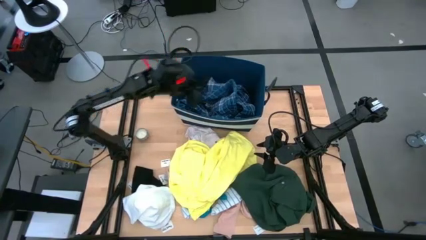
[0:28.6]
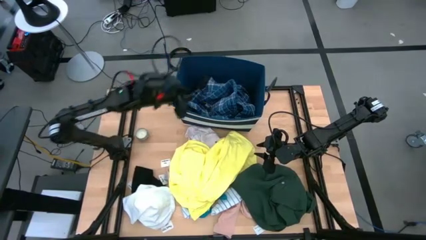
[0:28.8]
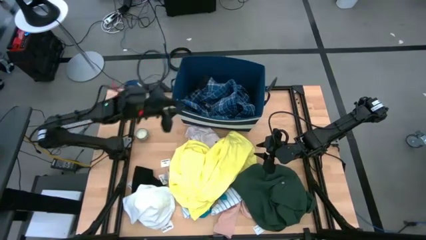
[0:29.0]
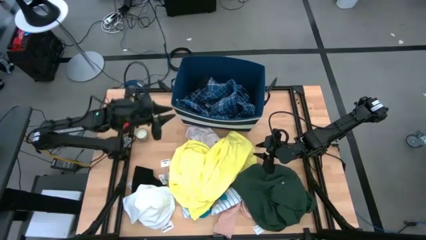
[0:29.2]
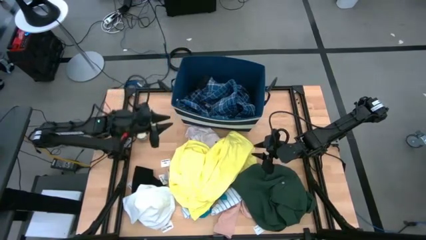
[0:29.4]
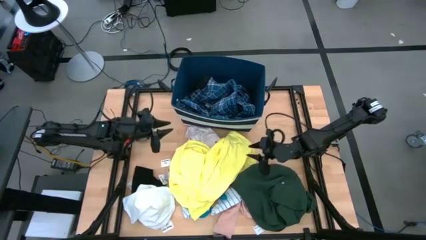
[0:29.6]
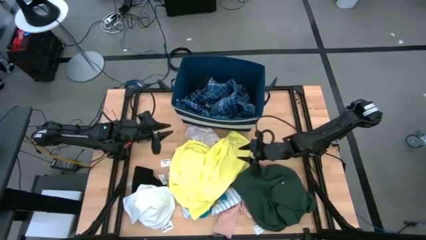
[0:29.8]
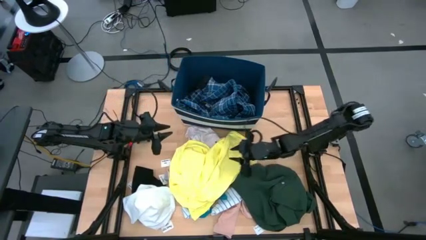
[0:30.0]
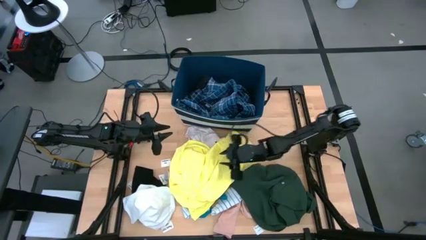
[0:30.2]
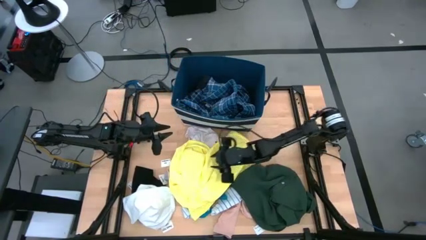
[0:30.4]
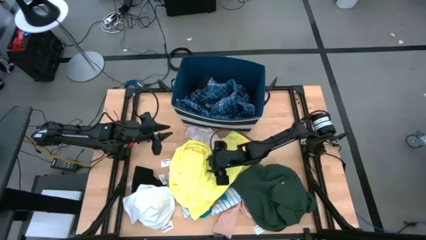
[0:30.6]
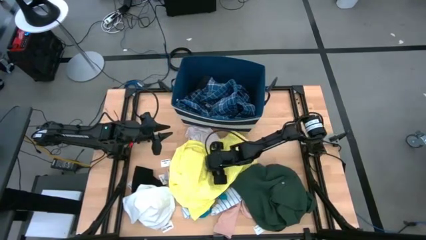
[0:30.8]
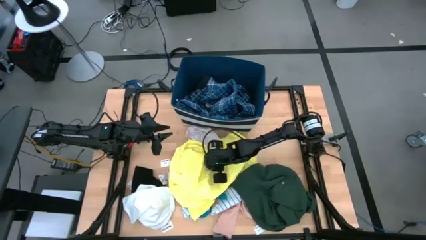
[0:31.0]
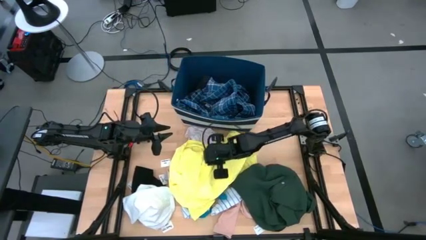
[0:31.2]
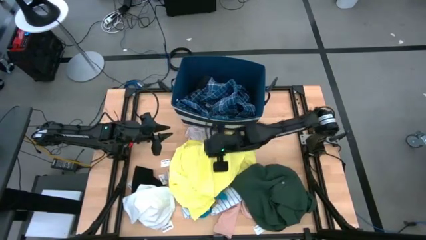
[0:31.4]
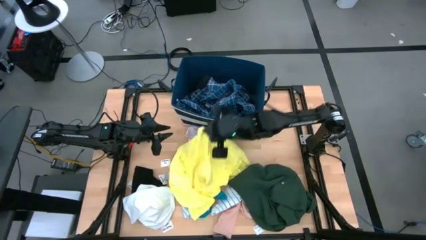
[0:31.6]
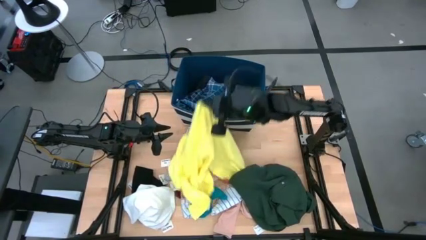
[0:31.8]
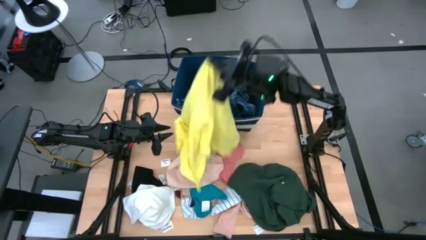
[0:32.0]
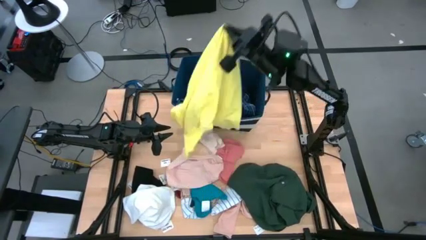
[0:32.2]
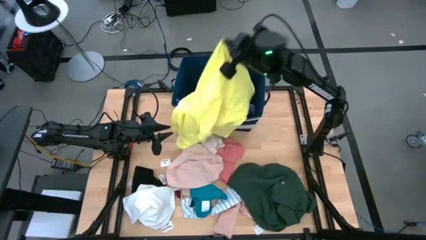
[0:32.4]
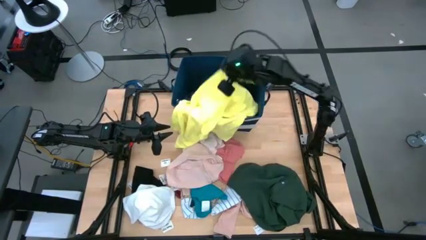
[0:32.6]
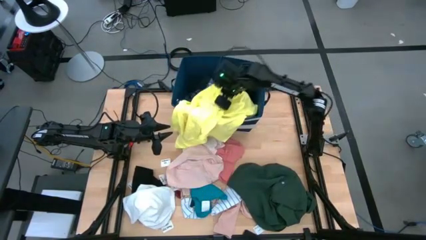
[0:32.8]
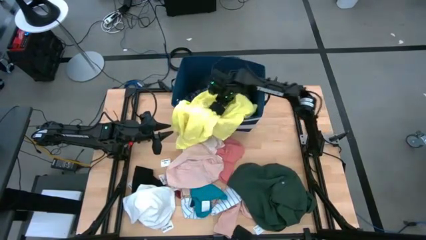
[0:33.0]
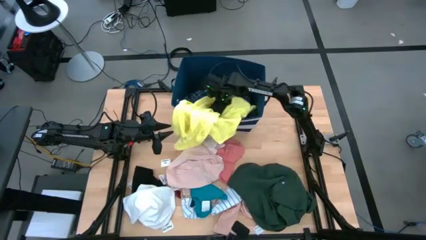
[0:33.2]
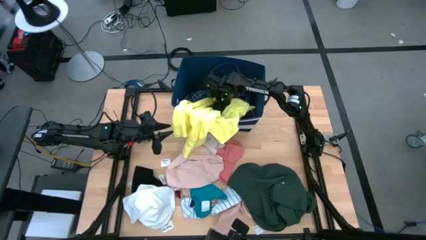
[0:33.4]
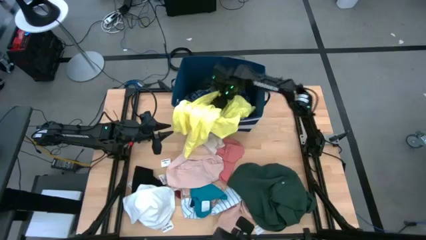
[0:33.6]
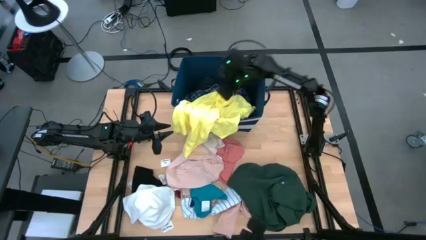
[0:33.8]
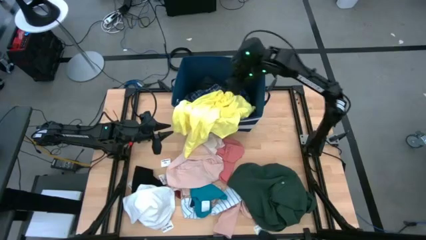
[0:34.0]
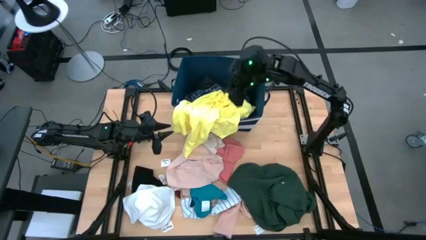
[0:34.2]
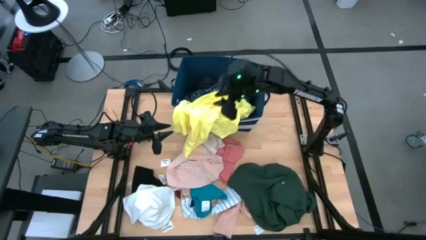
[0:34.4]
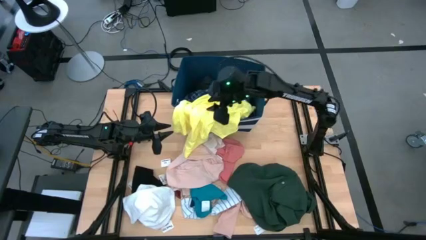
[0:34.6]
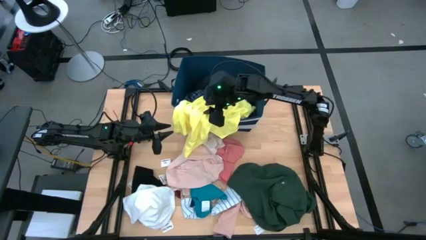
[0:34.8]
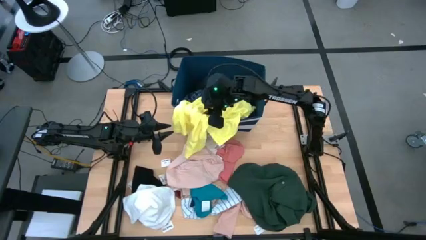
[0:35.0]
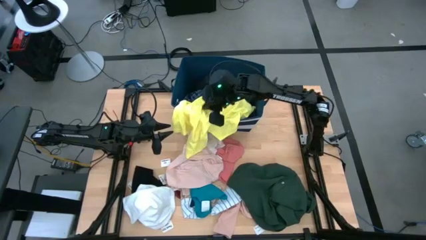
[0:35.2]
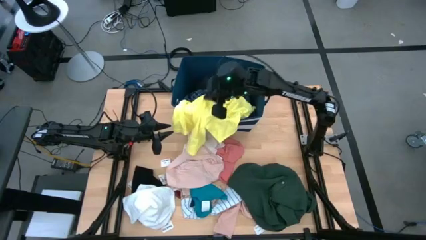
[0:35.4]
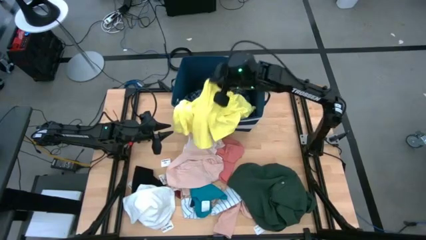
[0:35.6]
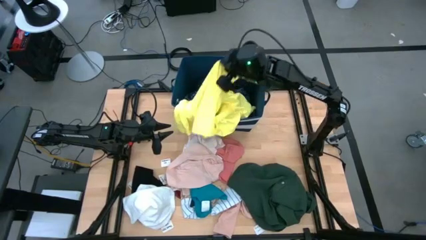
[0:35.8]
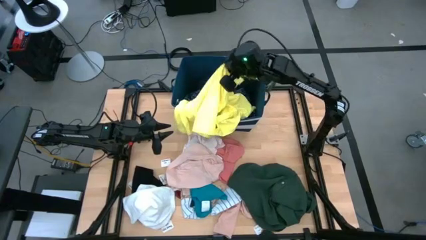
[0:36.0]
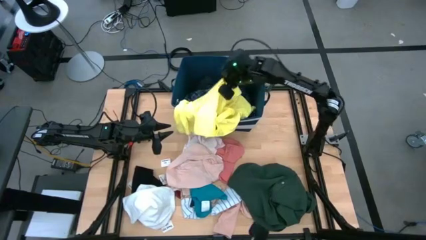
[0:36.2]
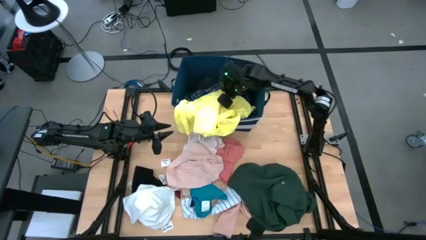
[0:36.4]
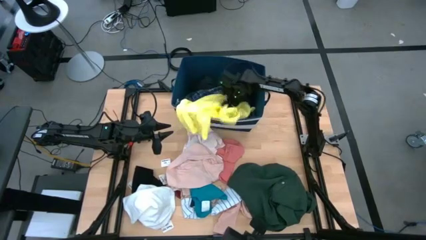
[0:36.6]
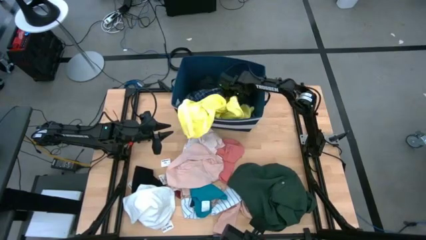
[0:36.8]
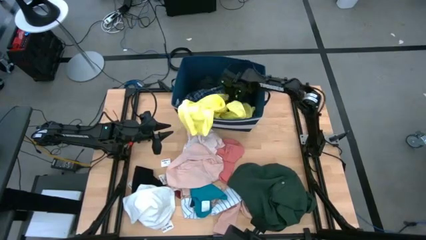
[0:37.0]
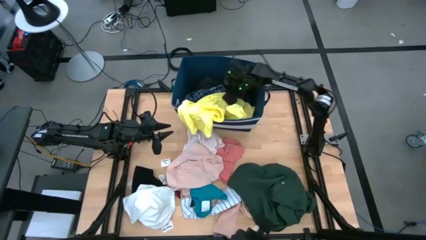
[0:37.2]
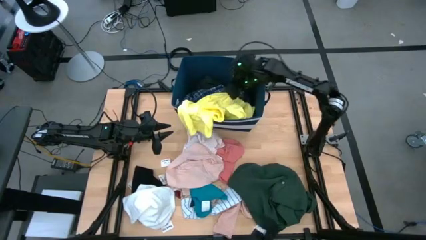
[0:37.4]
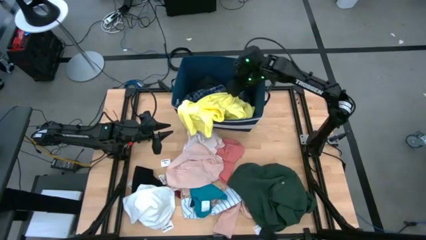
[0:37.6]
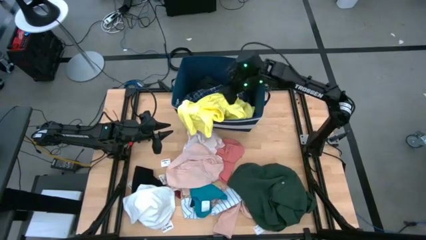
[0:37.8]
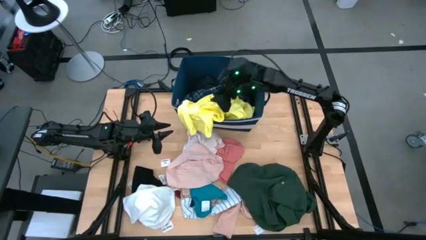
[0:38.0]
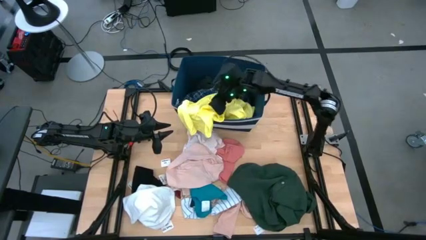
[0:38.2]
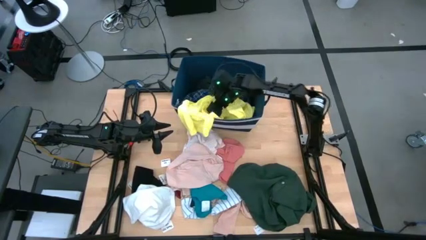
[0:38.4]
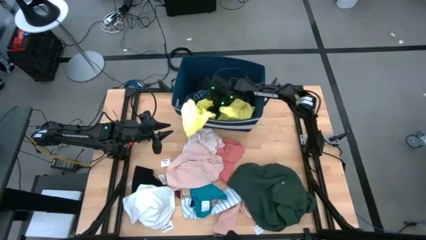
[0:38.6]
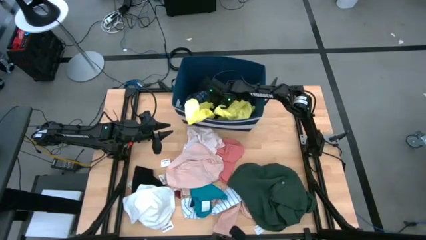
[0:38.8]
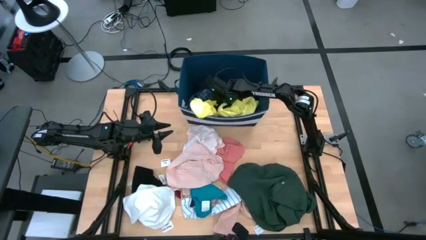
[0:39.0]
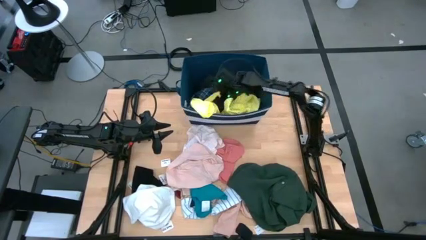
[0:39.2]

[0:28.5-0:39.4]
Task: Sort clothes
Put the yellow shirt into the blue laundry bin

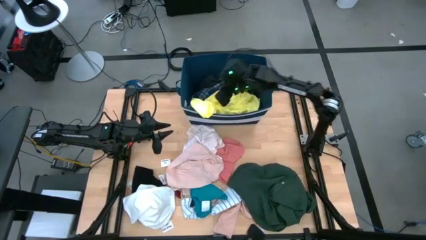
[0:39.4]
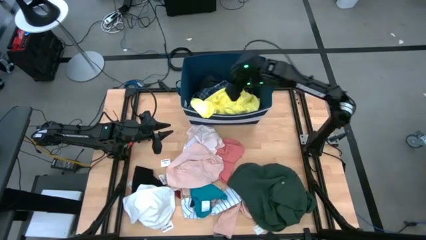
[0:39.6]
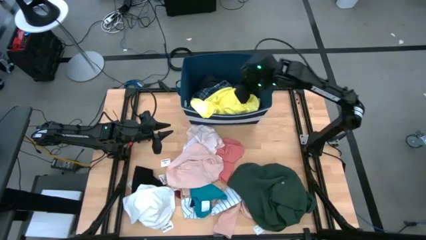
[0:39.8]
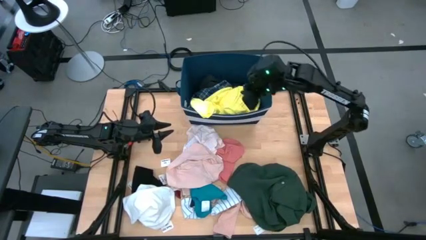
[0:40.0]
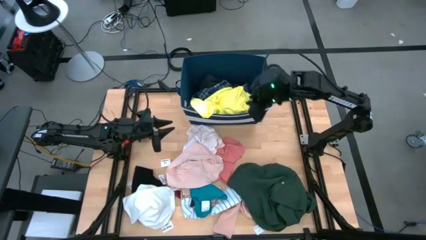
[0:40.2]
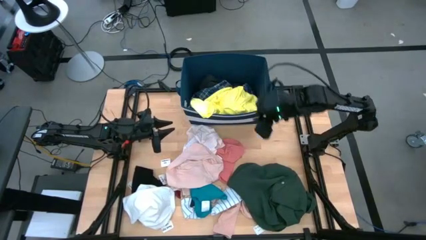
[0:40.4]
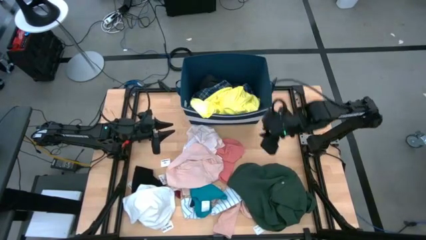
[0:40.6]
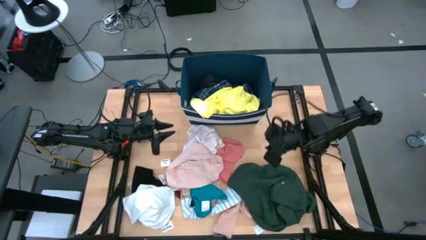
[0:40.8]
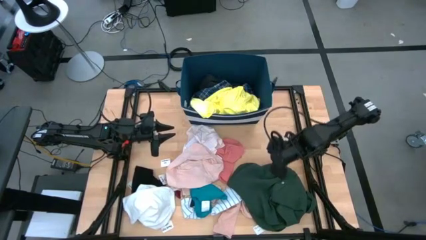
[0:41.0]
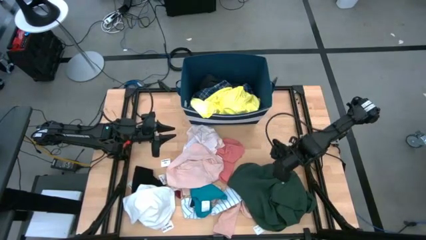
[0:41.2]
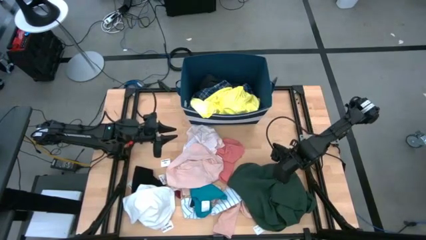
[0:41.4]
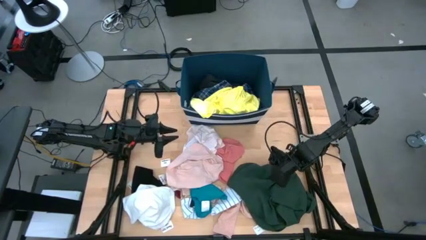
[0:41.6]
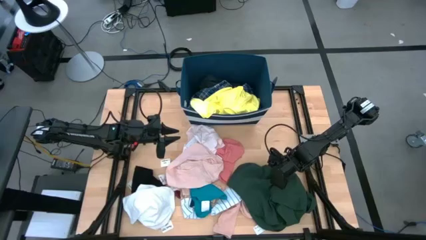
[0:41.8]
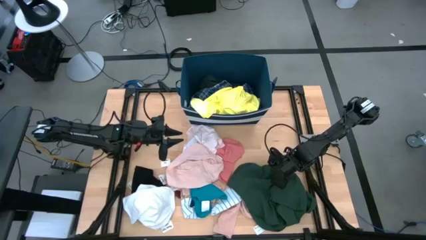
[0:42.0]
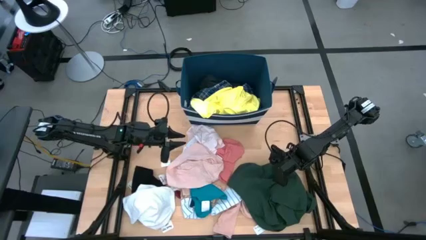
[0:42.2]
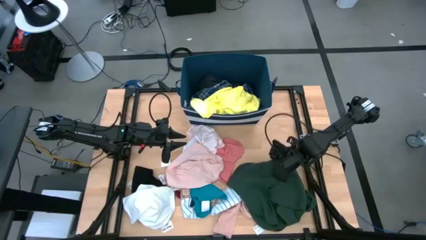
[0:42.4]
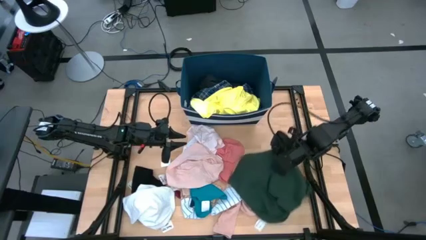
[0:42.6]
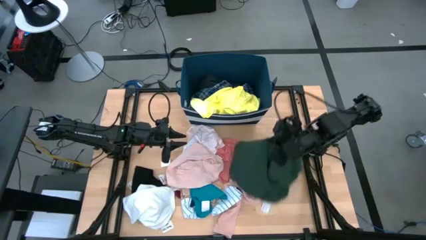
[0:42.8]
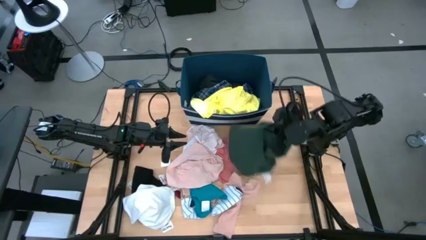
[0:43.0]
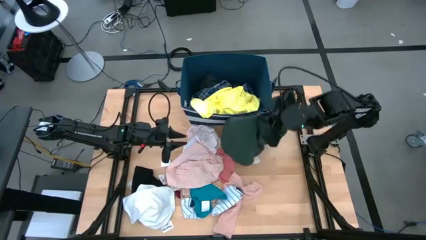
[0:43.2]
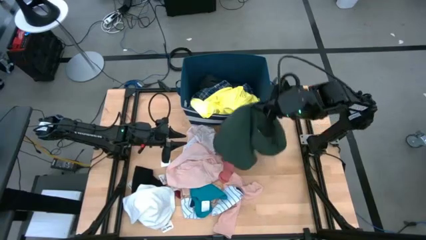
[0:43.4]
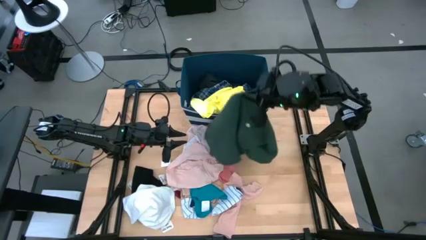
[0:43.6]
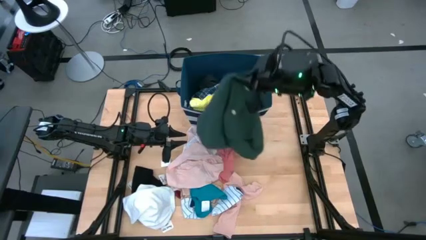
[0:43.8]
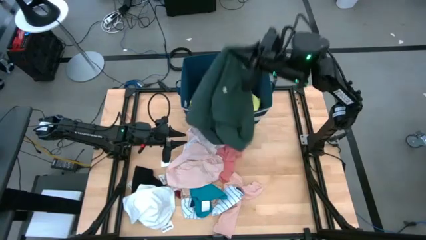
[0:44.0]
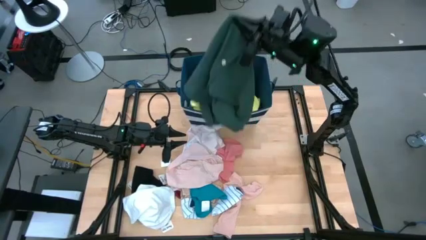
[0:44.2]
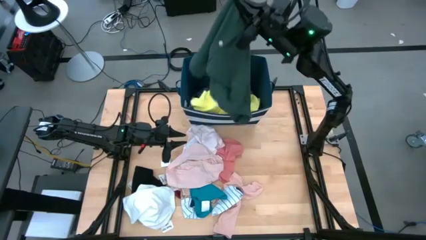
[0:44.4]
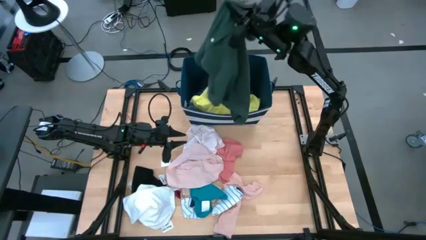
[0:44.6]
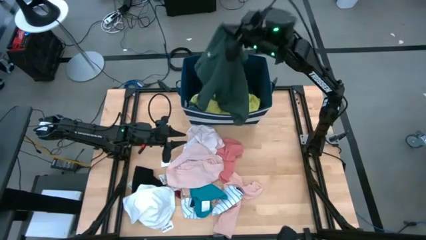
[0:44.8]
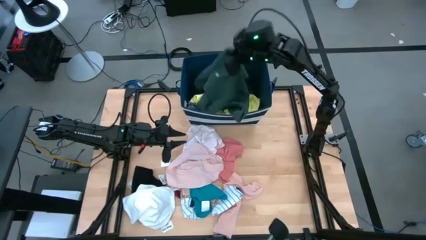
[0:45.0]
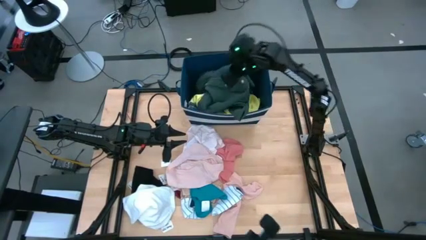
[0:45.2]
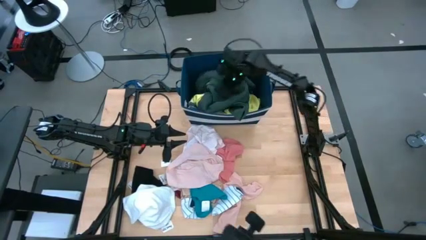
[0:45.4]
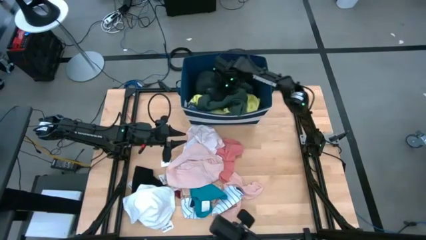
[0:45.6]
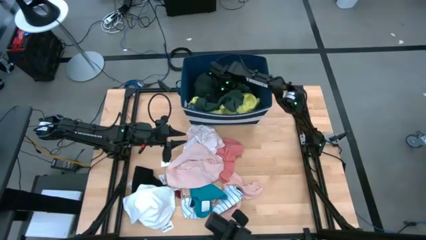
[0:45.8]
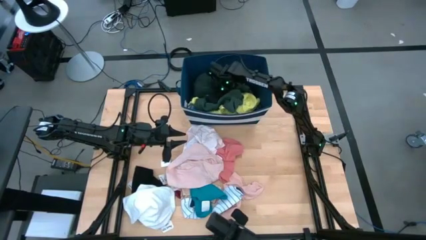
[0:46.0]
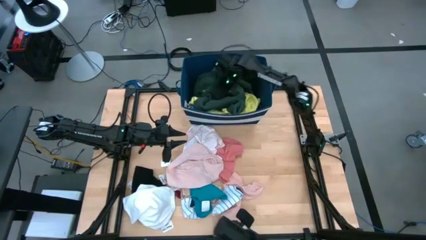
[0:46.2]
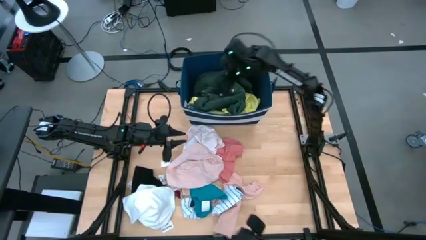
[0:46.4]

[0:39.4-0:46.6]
Put the green shirt into the blue laundry bin
